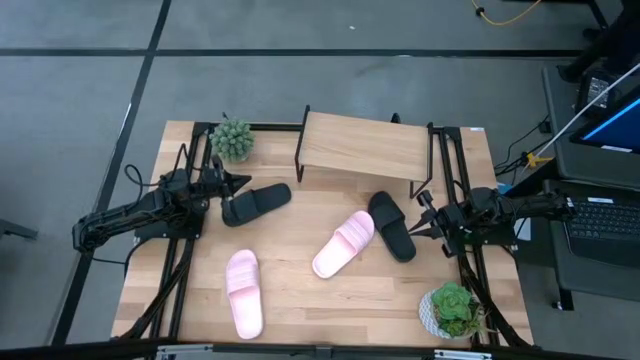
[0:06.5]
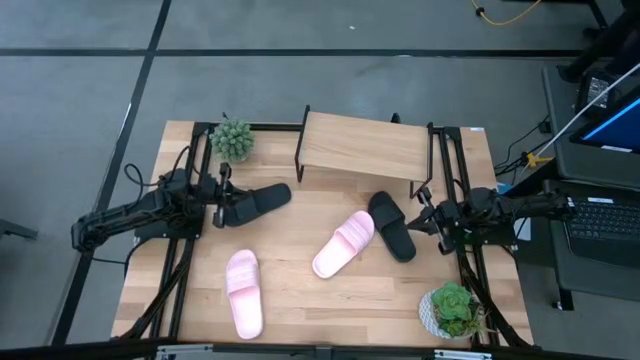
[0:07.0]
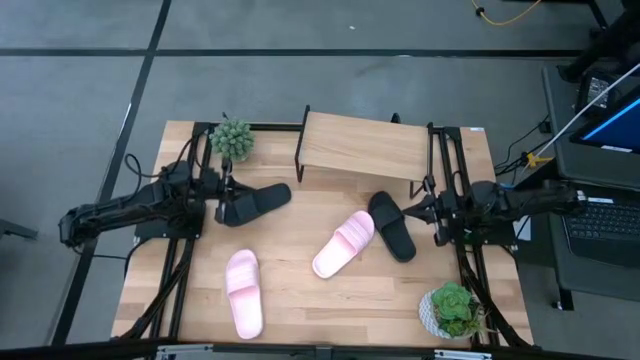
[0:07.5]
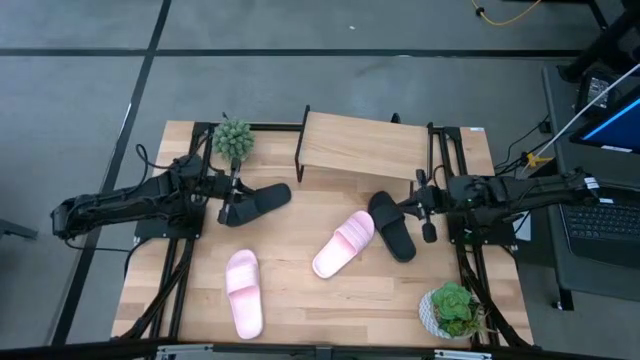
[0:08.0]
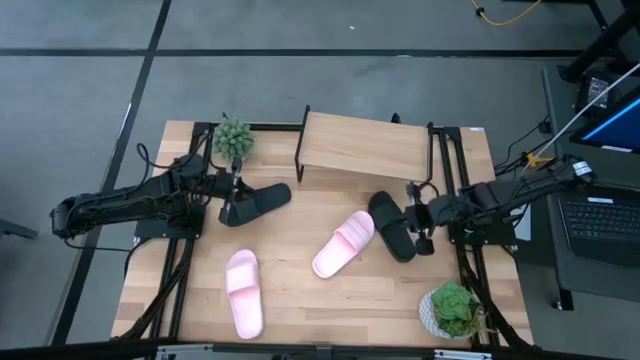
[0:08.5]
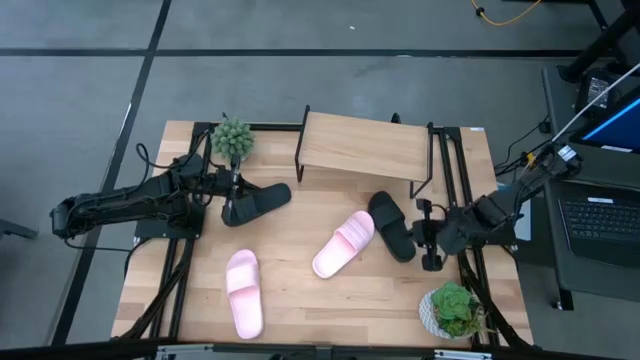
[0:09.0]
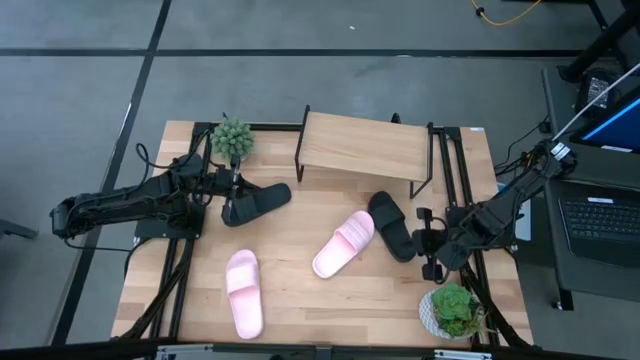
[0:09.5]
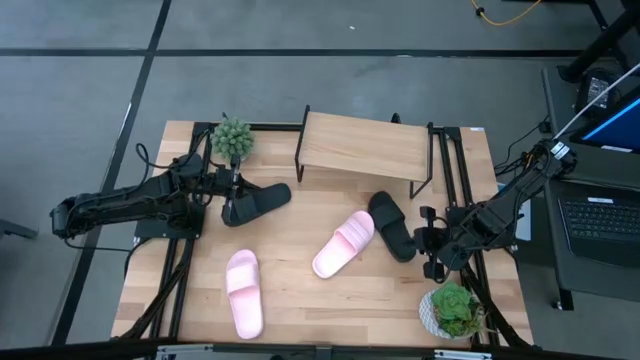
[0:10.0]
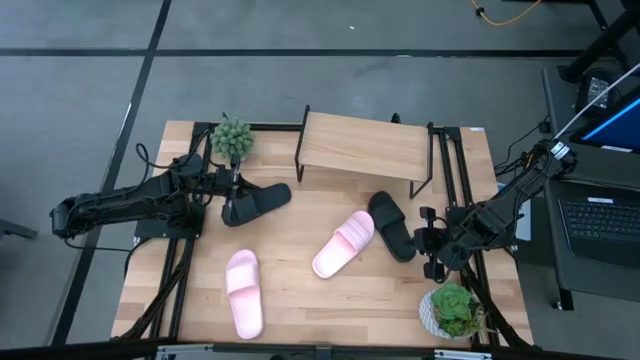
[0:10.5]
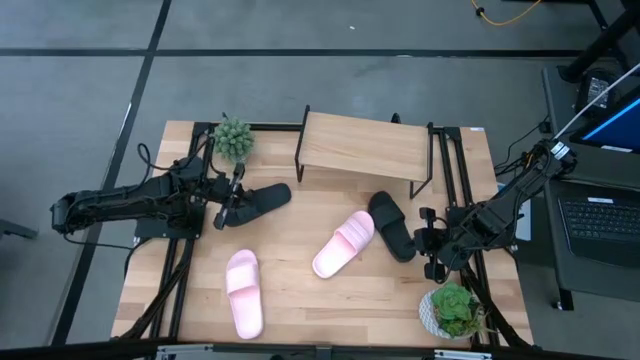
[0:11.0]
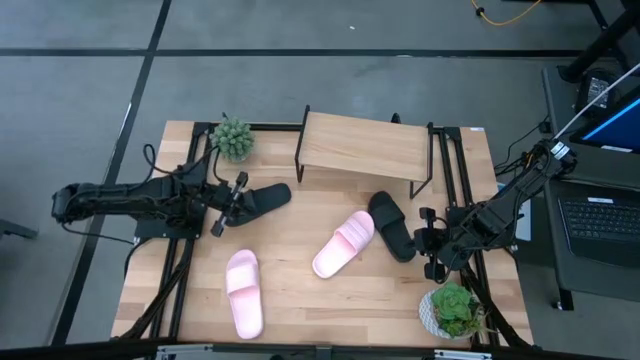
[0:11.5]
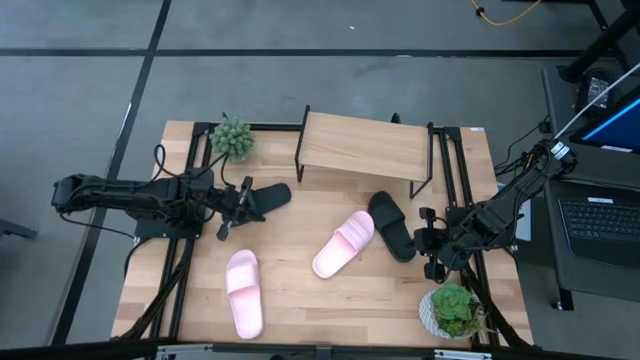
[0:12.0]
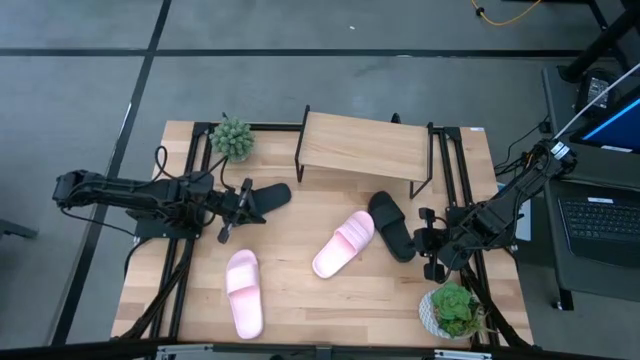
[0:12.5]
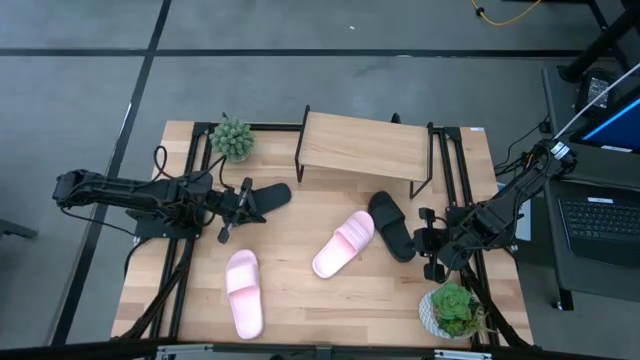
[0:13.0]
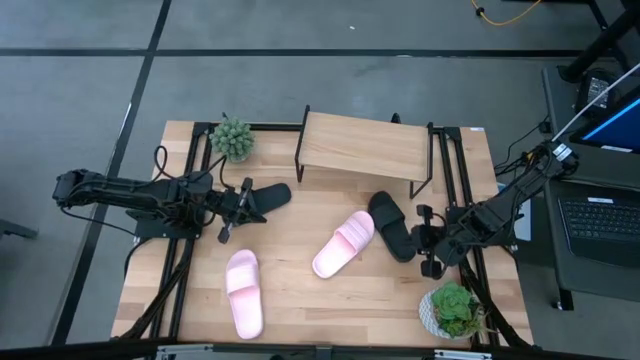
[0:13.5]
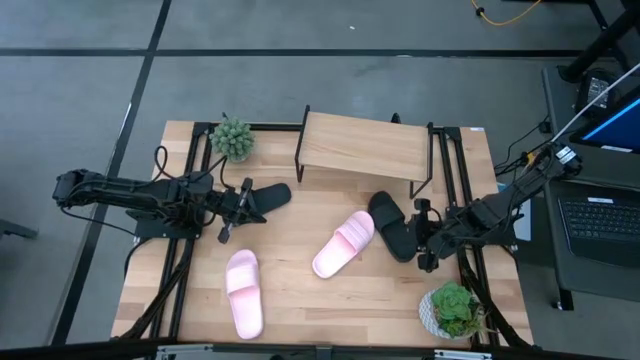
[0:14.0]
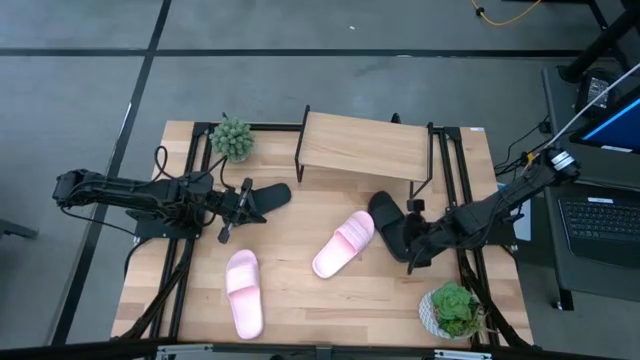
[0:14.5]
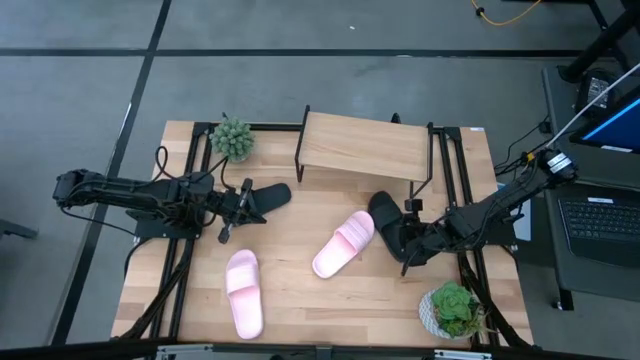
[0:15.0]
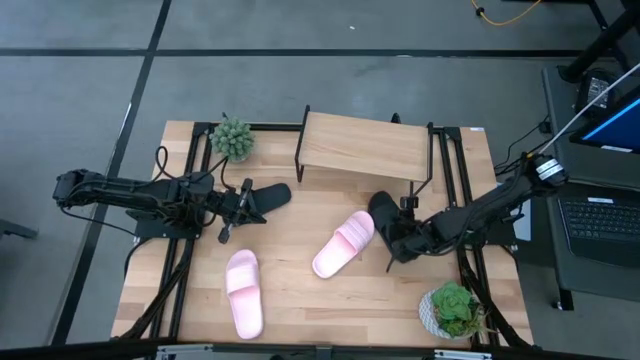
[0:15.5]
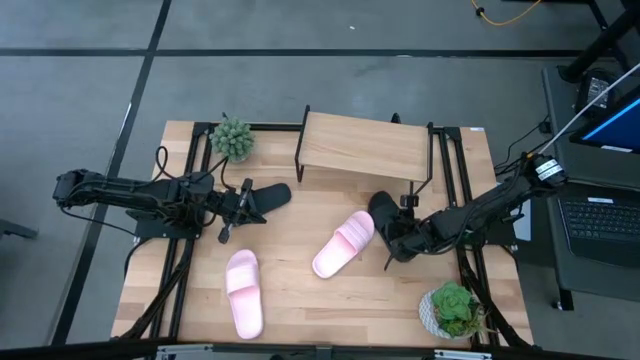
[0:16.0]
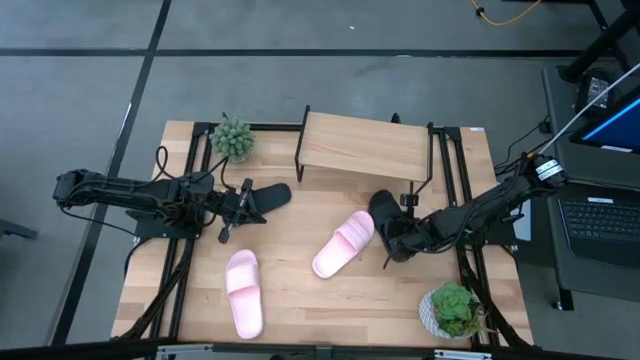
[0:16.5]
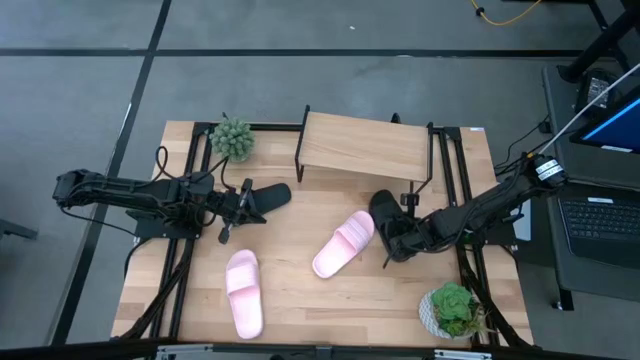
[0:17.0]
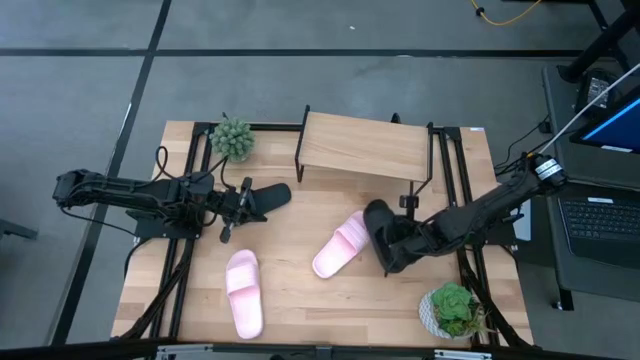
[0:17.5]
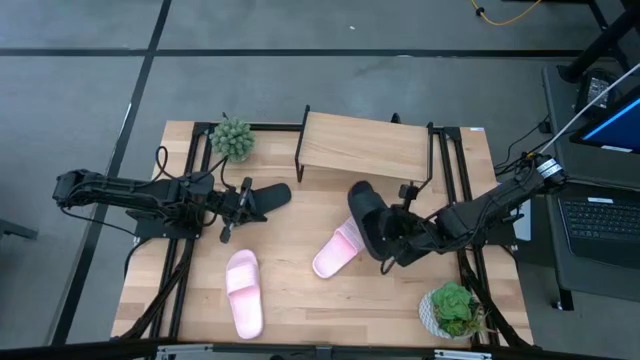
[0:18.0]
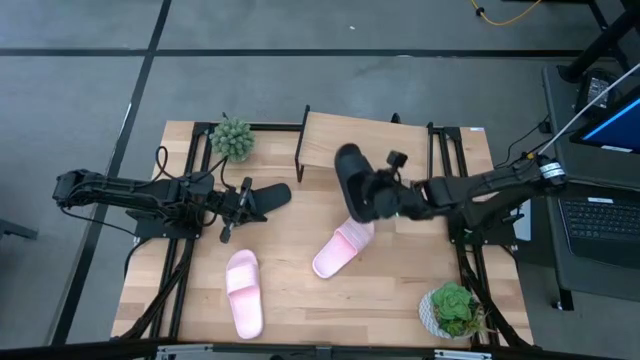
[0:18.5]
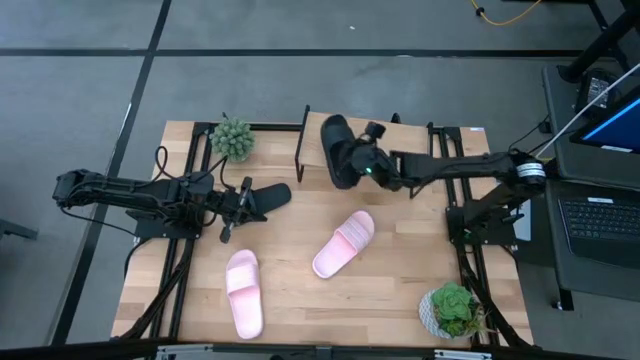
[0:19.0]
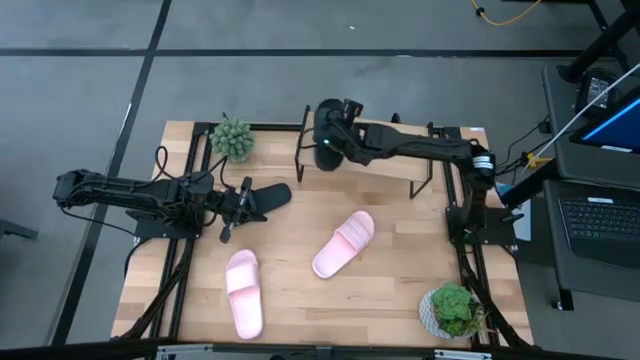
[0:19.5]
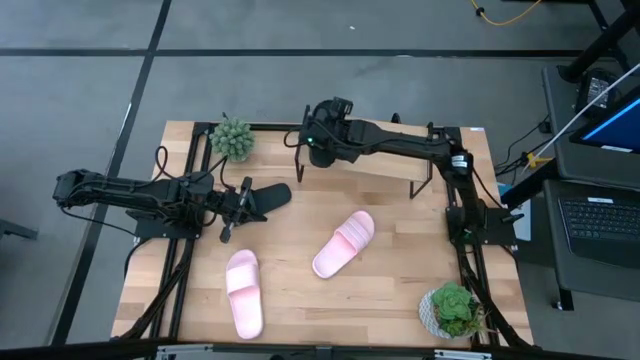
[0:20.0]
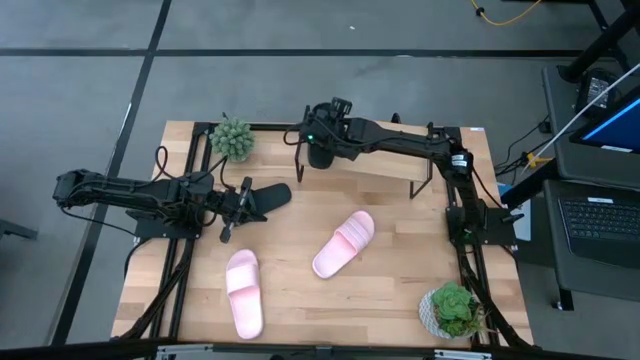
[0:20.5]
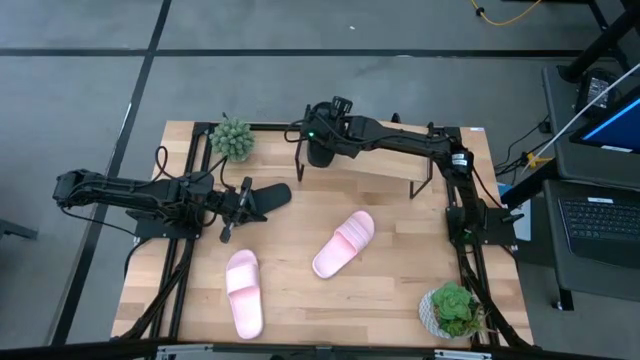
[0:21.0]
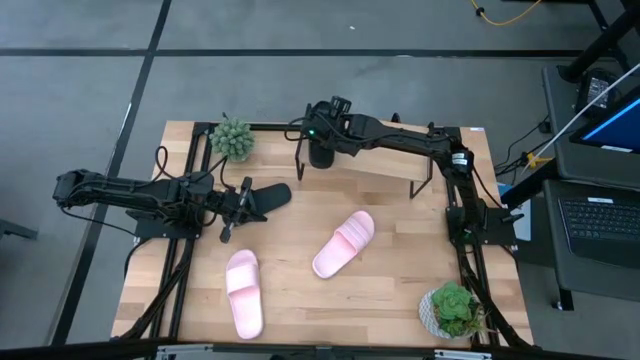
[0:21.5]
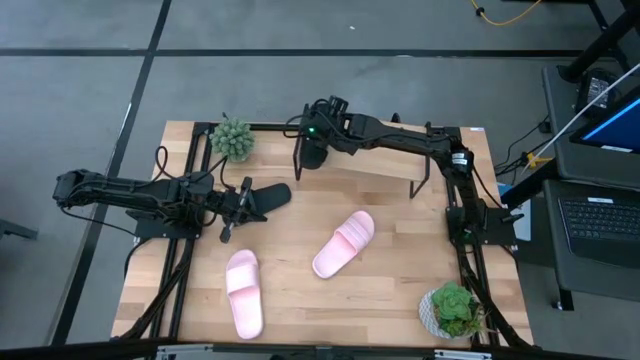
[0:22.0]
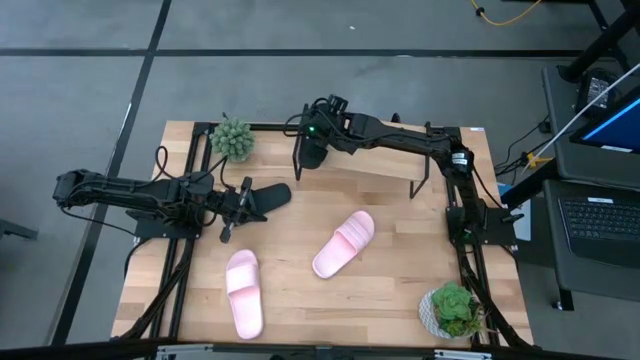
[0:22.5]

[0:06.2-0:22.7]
Task: Pick and place slides into the shelf
Put the right black slide on the shelf

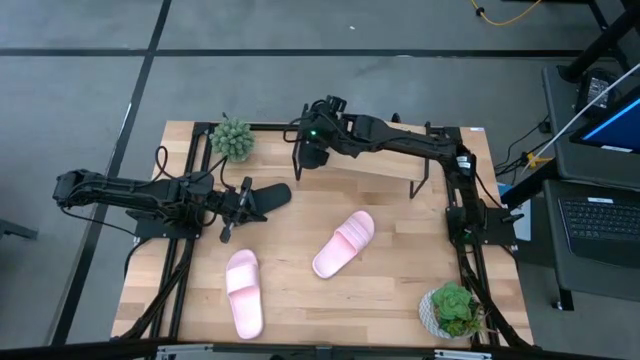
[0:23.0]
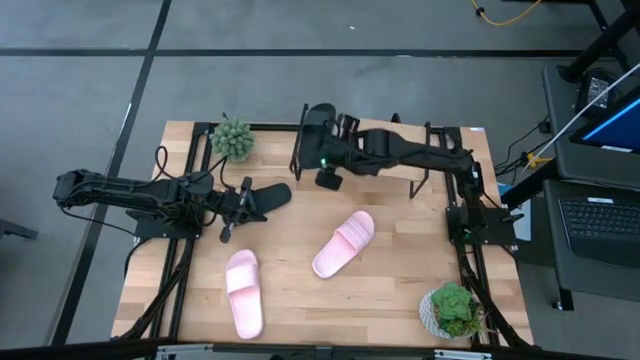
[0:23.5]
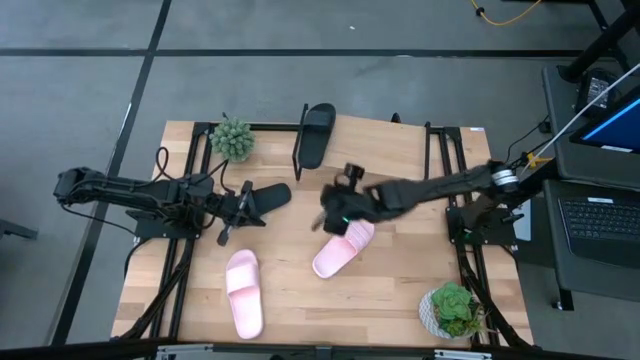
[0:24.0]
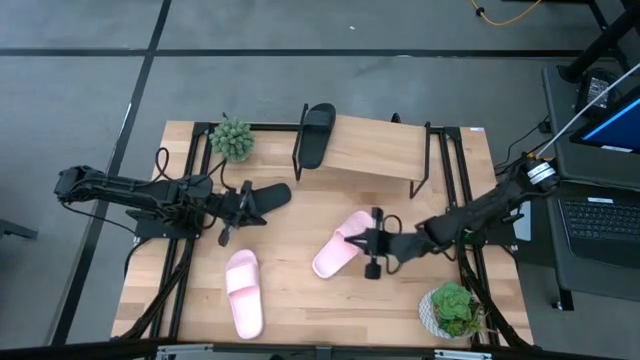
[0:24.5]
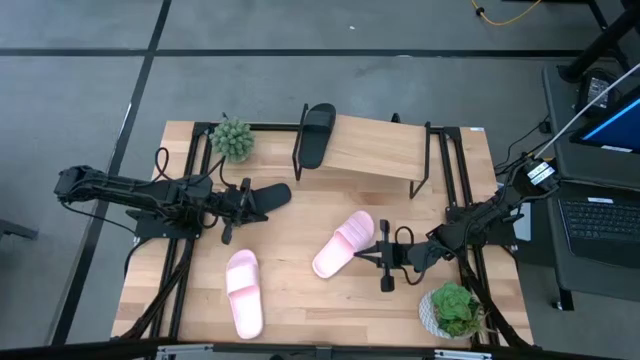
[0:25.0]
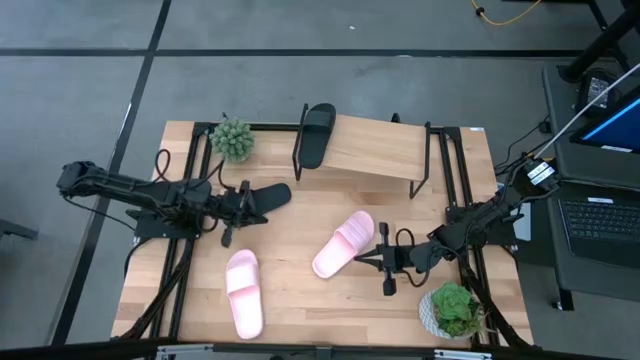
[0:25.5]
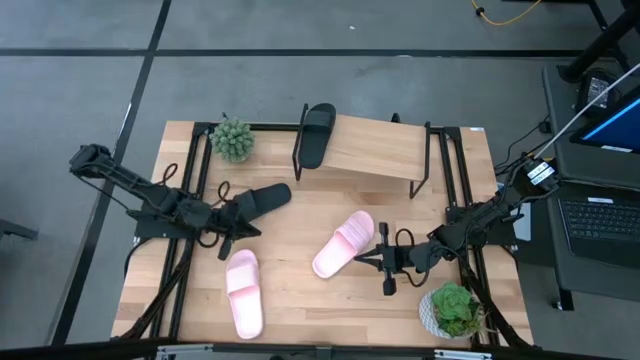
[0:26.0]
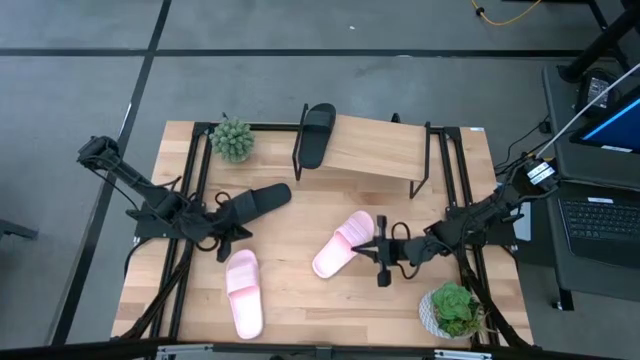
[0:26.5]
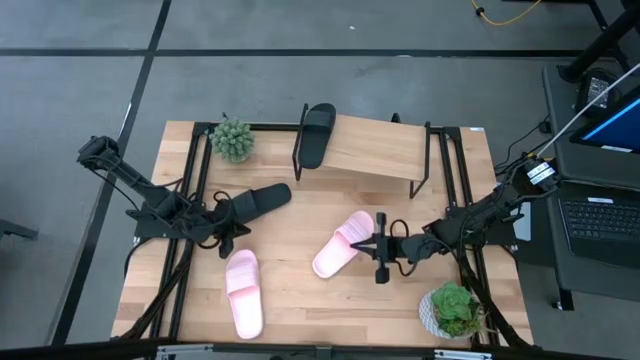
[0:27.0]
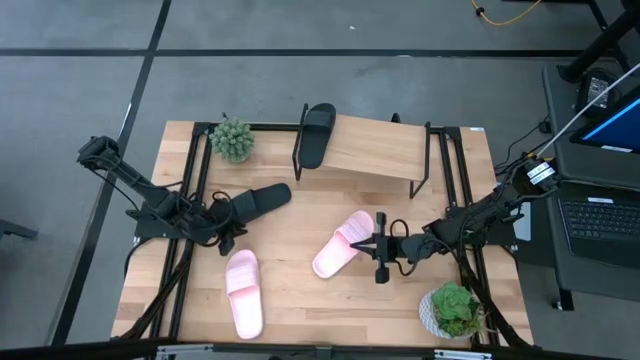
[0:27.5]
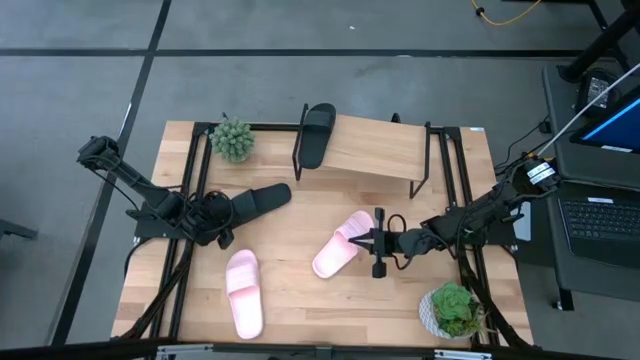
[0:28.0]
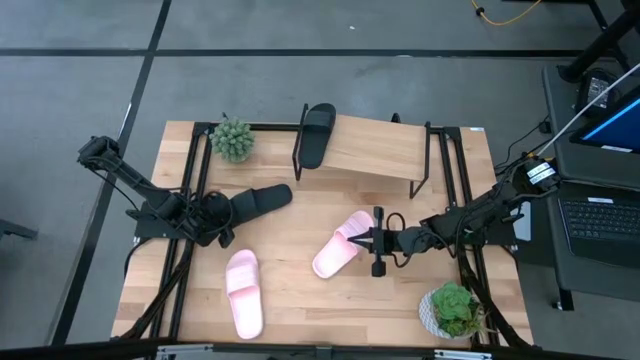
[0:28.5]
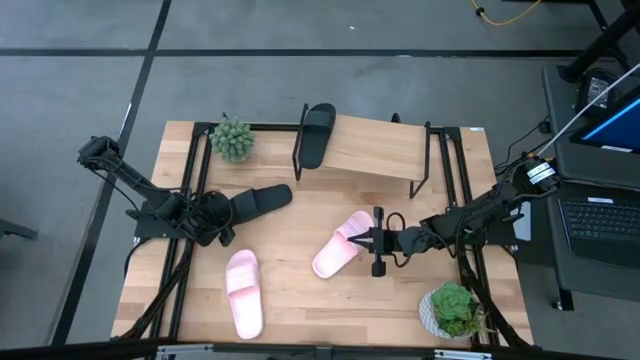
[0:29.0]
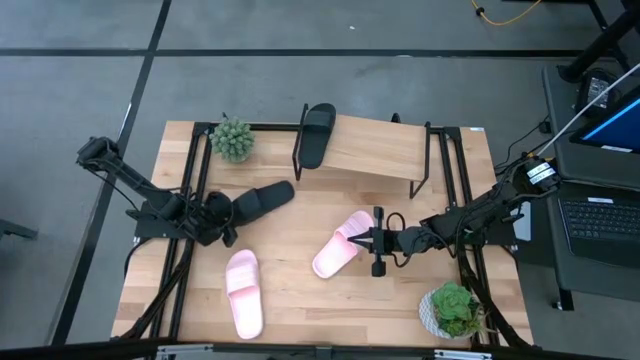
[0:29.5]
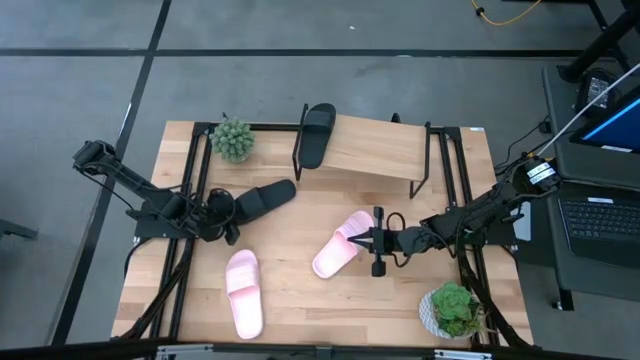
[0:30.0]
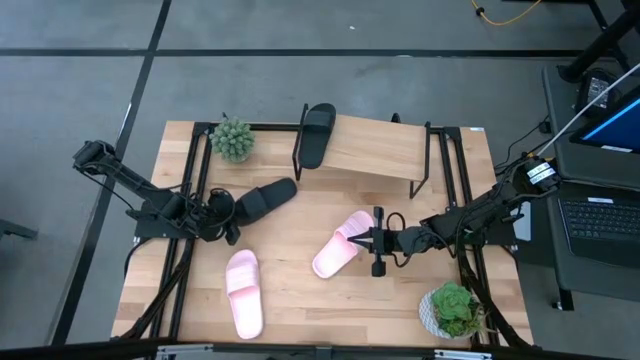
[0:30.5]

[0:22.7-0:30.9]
Put the black slide on the shelf
